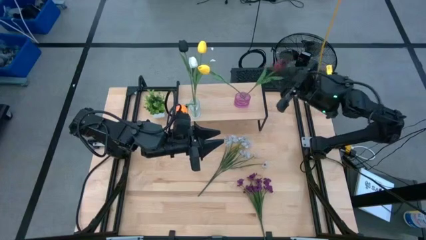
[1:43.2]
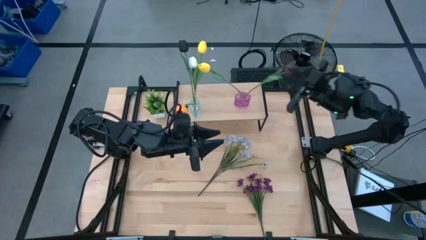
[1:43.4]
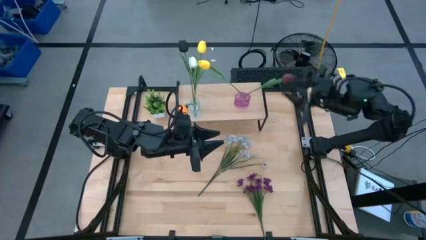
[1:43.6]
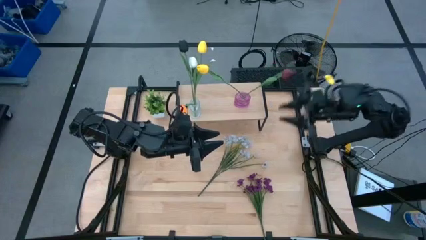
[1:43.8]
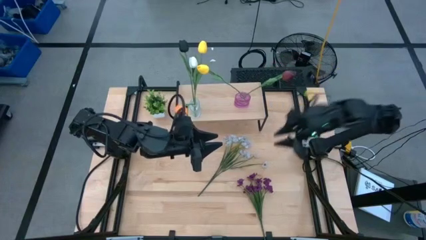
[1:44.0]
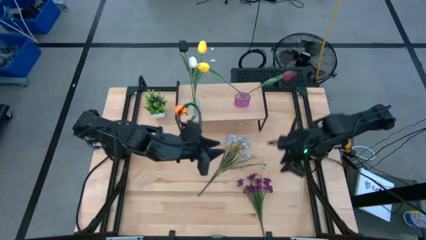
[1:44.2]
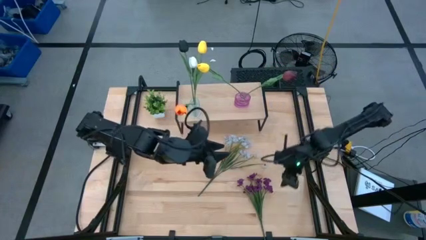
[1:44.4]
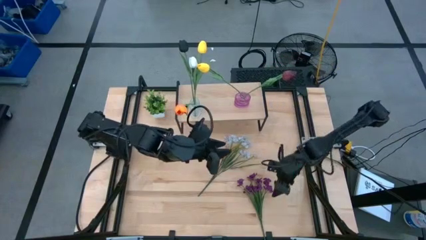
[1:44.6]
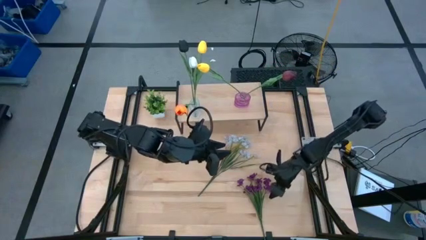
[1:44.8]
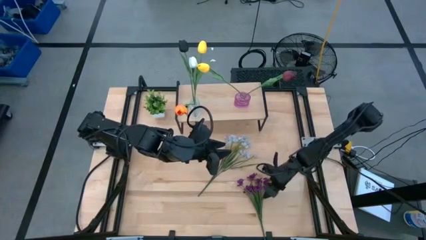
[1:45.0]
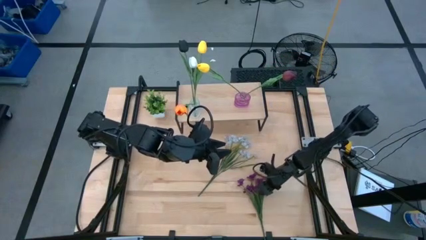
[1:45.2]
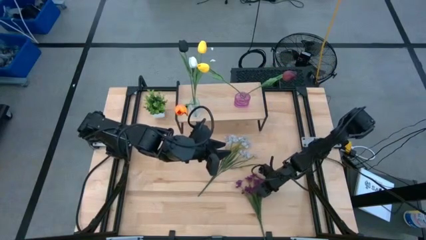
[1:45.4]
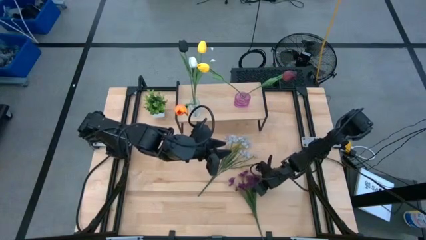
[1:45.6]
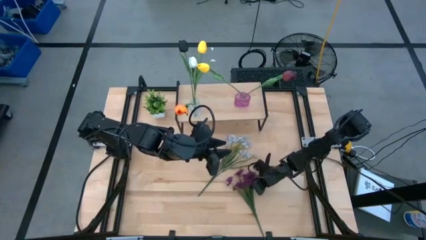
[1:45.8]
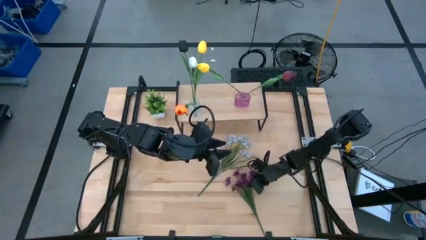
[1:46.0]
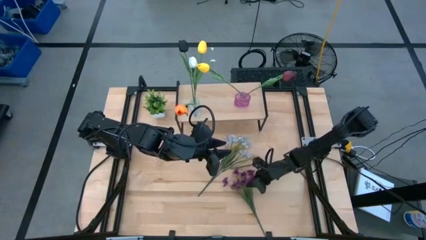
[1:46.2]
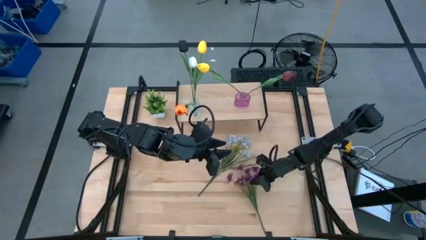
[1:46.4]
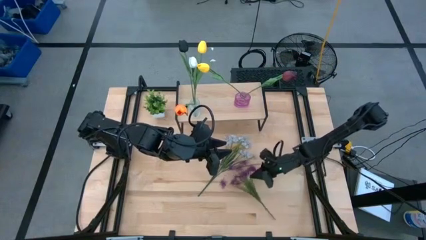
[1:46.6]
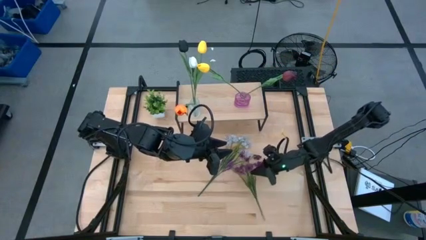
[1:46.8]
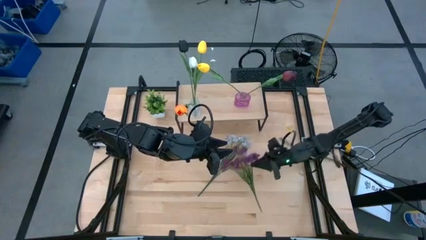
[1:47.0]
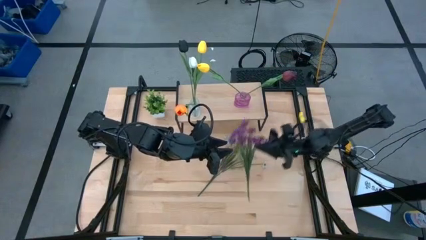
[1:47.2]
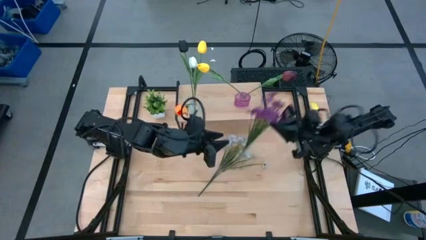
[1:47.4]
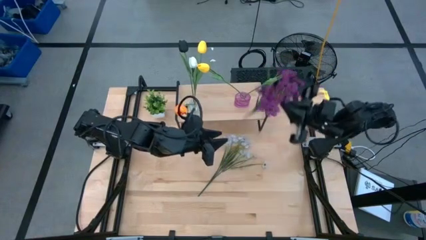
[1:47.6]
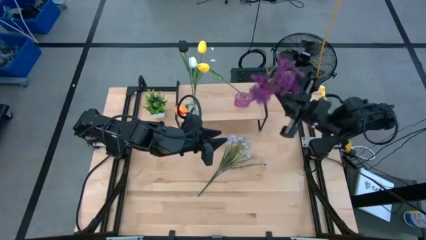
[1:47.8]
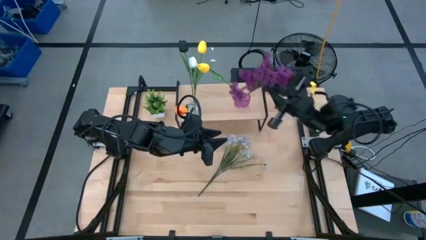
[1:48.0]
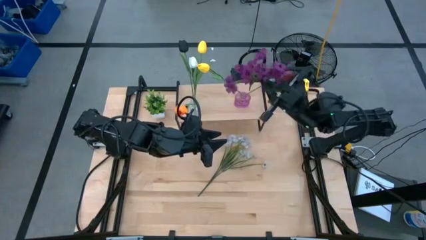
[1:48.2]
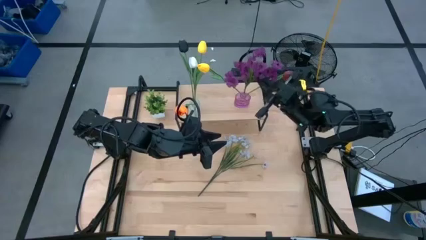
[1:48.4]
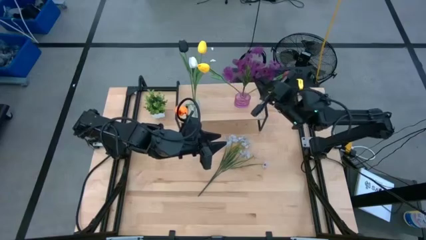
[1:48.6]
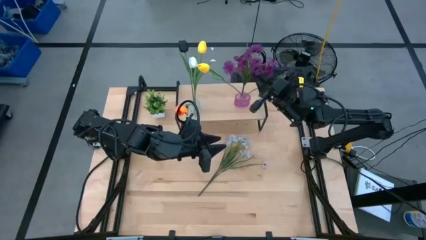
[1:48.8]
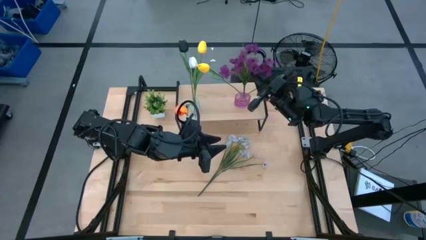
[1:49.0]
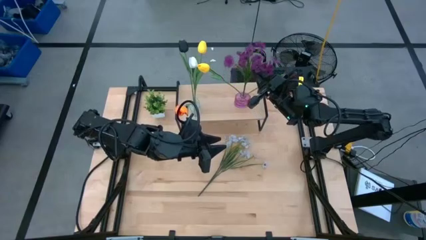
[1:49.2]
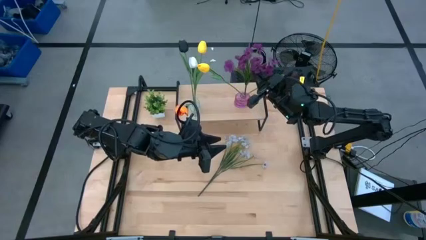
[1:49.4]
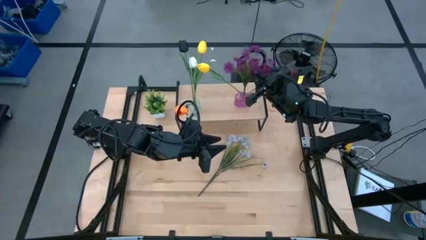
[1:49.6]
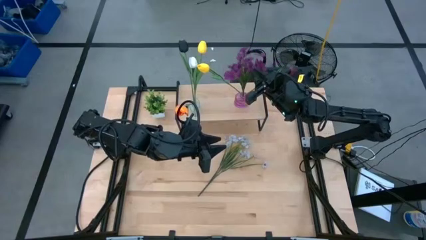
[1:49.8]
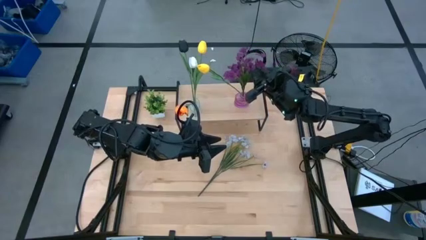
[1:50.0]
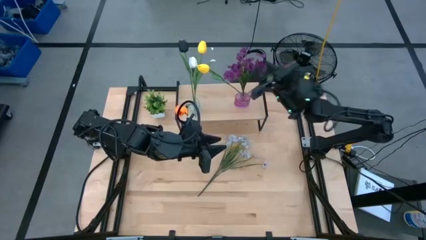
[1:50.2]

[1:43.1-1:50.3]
Task: Pick and place flowers into a vace then onto a shelf
Put the purple orchid into the purple vase

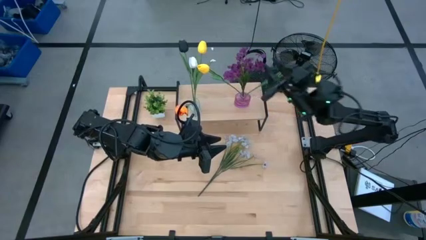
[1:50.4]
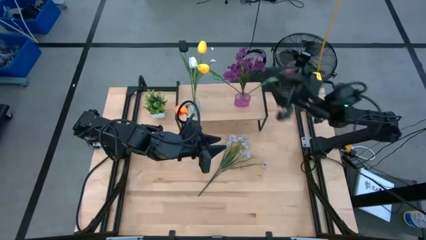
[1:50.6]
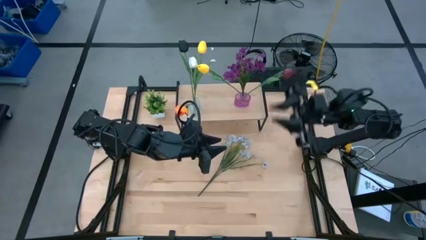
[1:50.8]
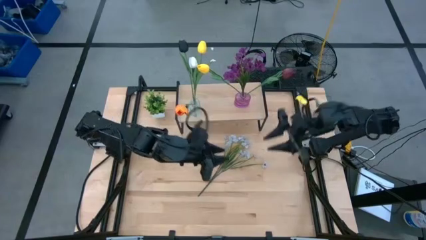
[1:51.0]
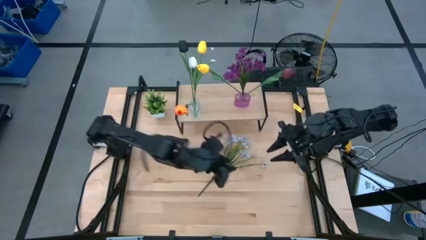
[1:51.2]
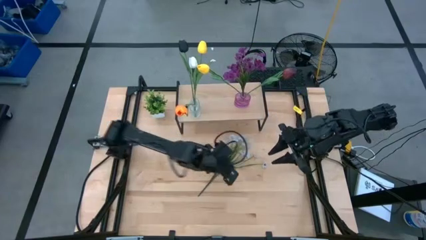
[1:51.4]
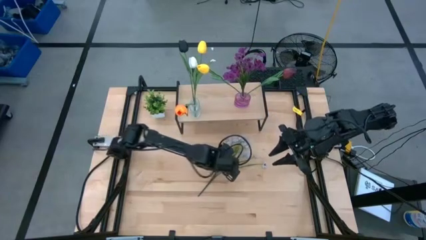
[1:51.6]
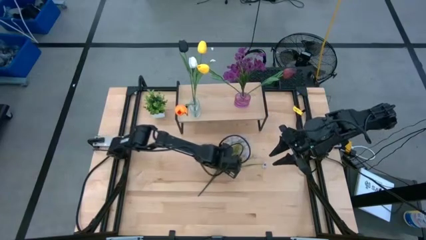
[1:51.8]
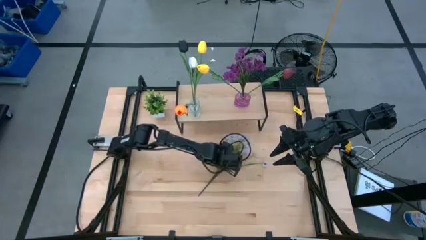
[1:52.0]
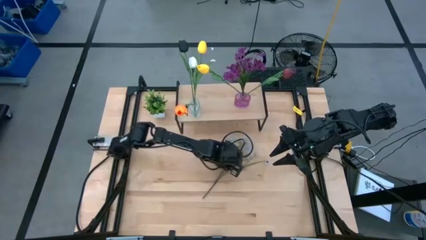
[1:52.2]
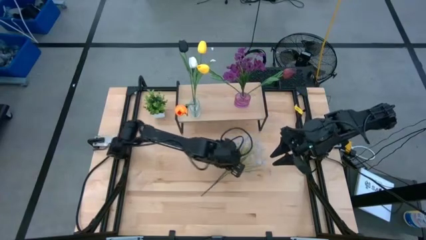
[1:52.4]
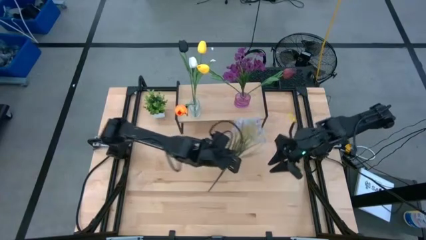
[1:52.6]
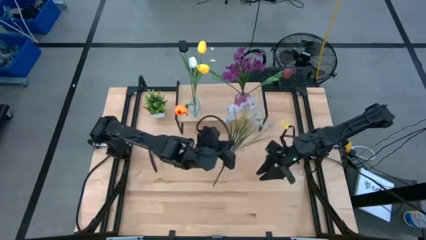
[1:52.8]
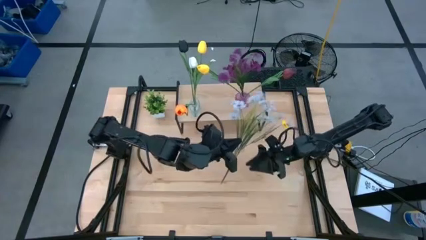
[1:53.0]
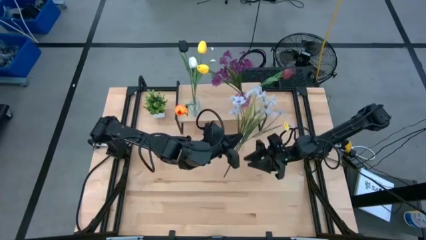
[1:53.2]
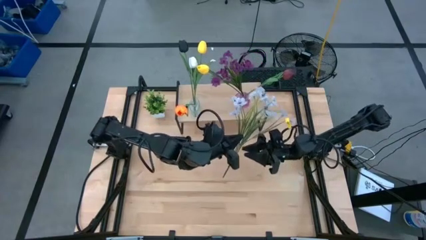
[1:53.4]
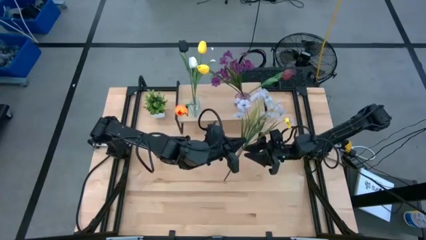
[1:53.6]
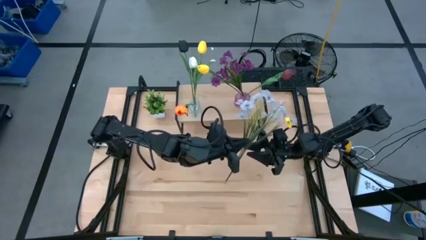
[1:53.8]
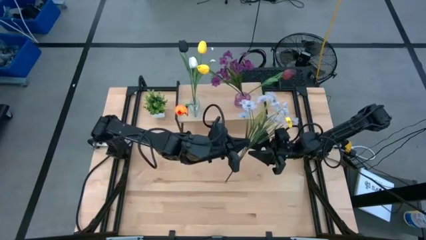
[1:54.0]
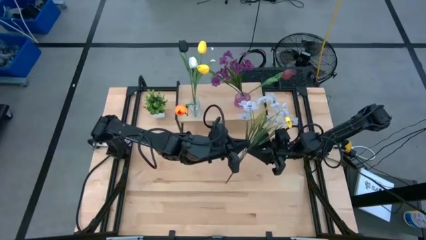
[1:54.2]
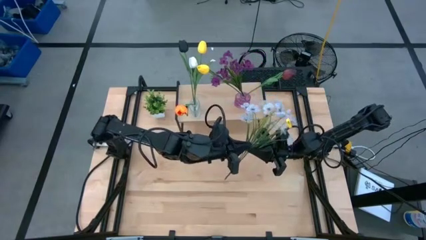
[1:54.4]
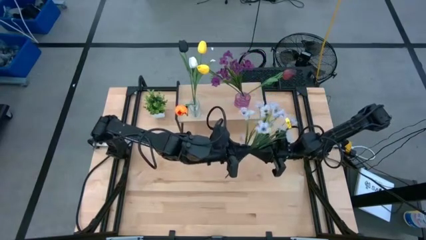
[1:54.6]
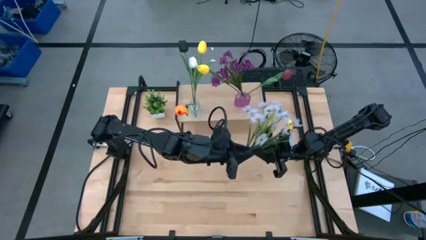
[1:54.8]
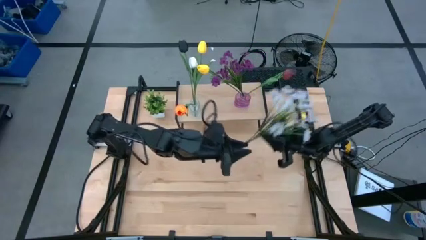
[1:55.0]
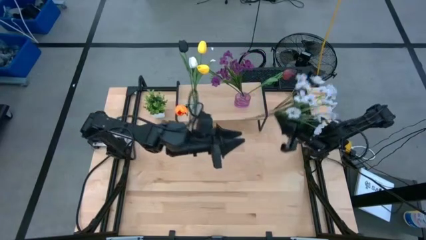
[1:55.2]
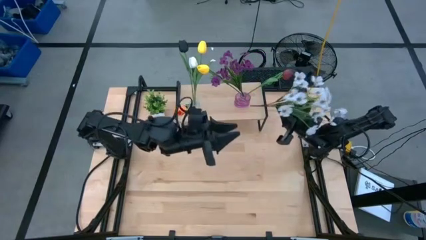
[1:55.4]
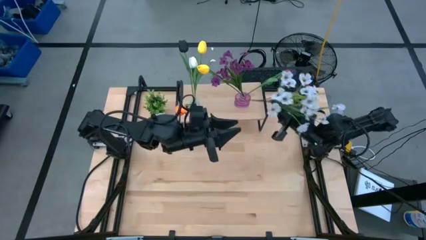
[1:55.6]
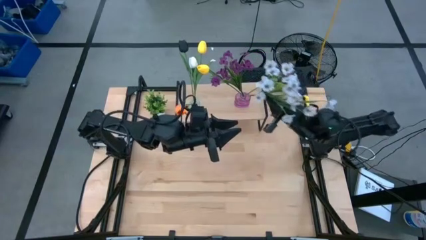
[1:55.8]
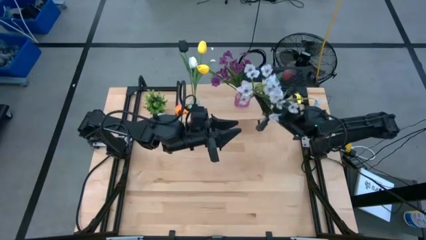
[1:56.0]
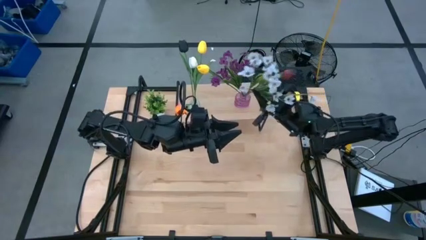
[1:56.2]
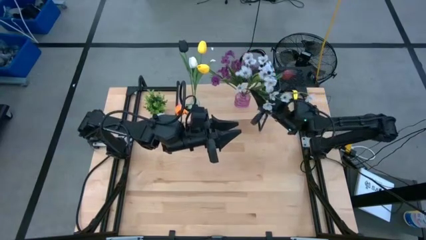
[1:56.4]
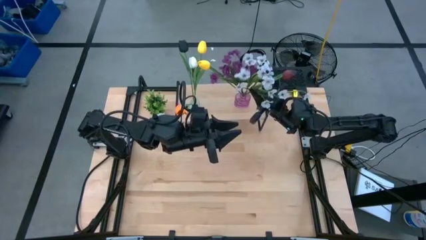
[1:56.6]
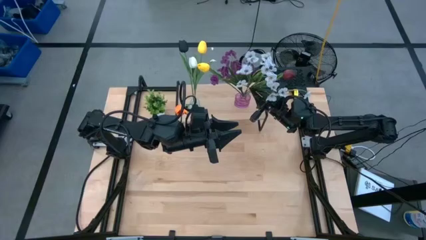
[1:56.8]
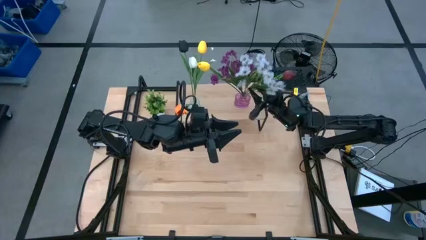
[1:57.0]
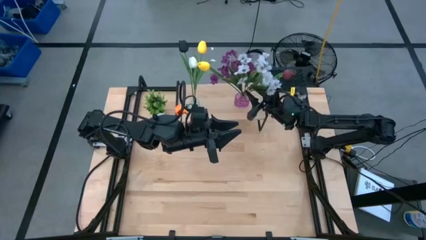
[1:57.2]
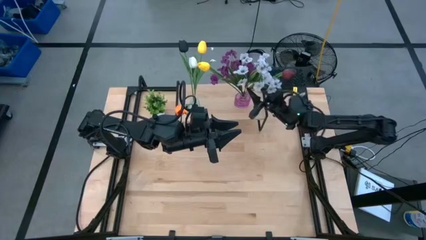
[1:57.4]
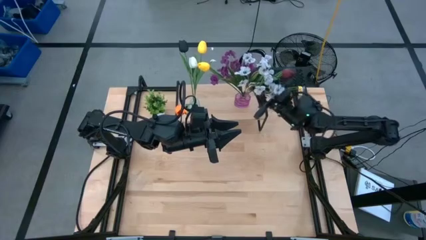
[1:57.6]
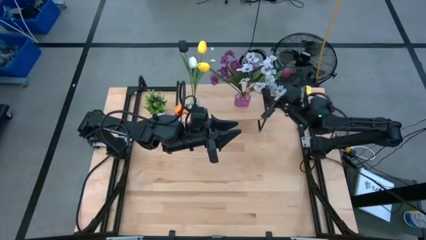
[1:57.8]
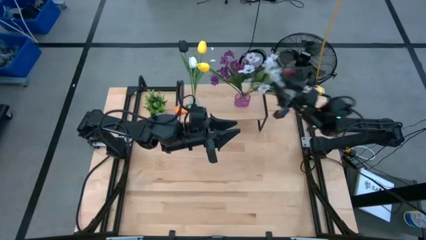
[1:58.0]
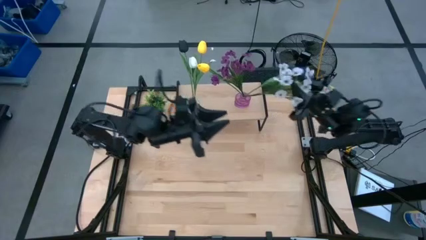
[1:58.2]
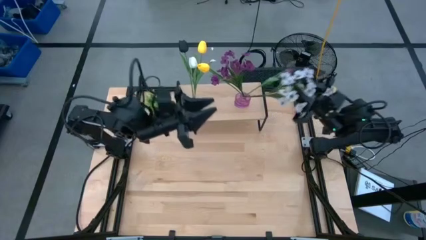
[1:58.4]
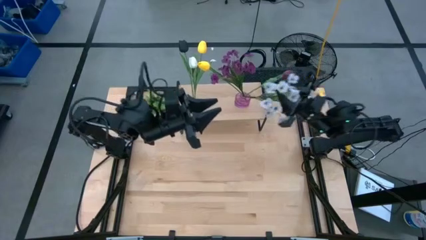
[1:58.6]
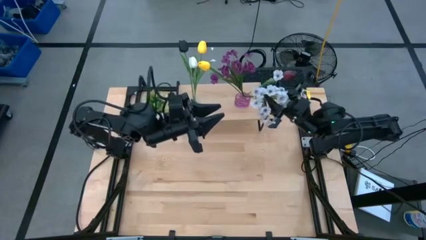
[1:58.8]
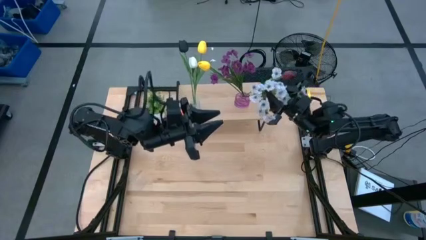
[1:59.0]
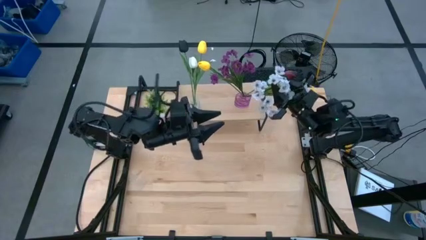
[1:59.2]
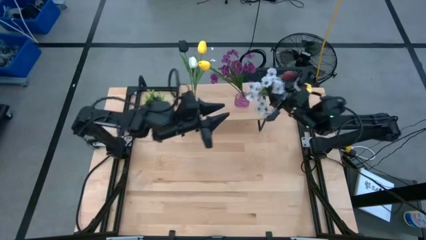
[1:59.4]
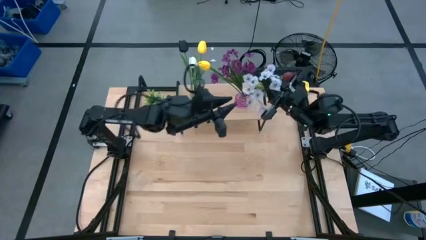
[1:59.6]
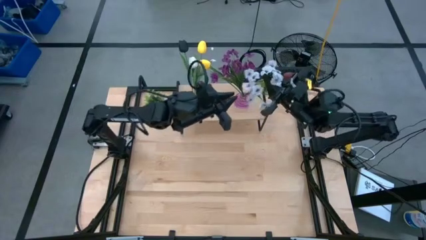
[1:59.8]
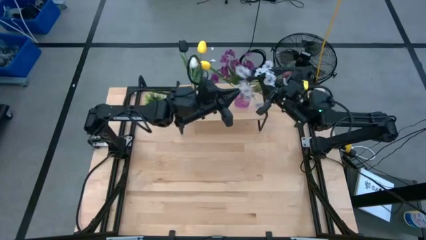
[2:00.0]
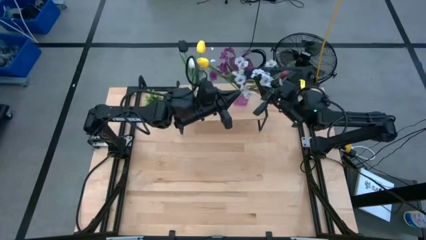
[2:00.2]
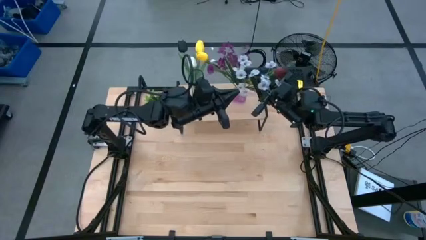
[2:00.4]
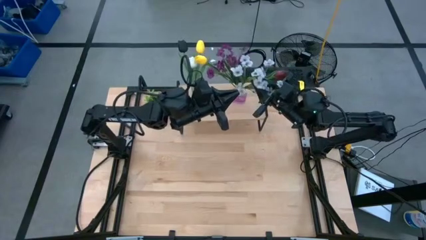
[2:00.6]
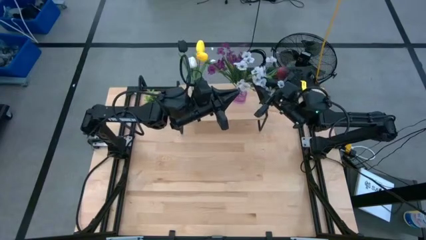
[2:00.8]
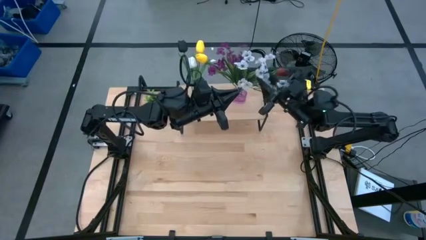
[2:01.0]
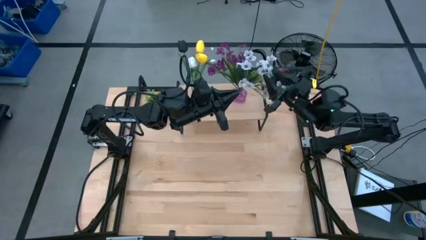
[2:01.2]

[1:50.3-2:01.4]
Put the white orchid into the purple vase
